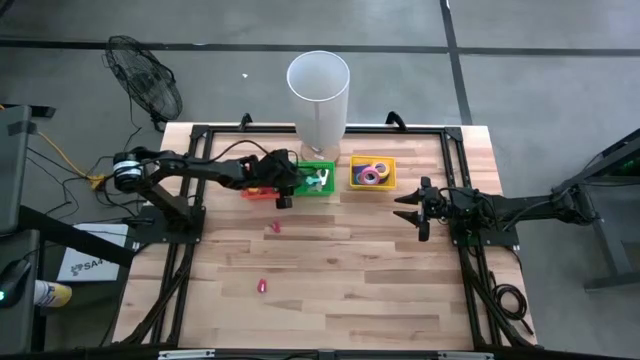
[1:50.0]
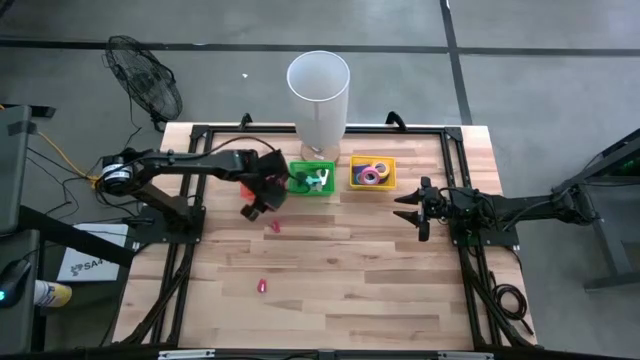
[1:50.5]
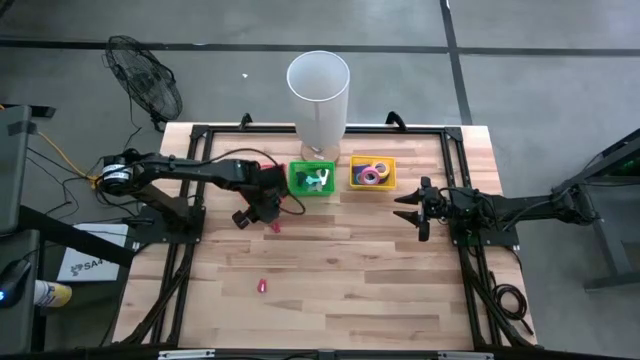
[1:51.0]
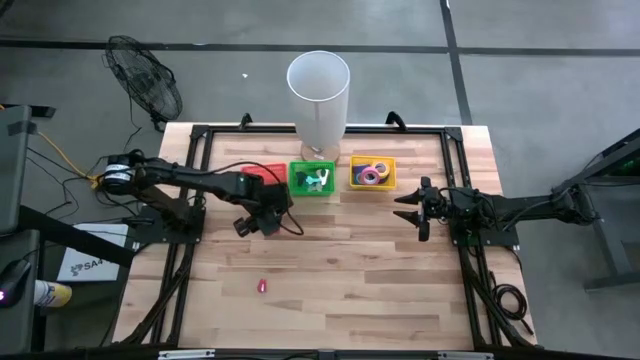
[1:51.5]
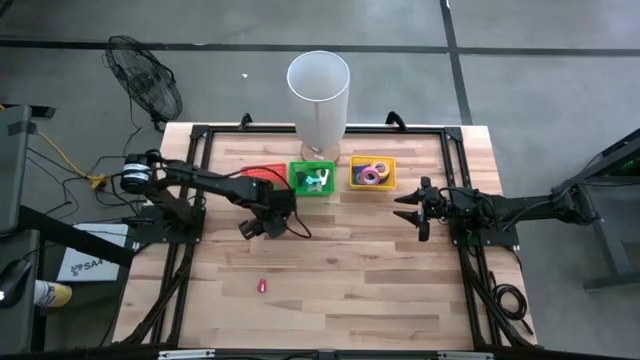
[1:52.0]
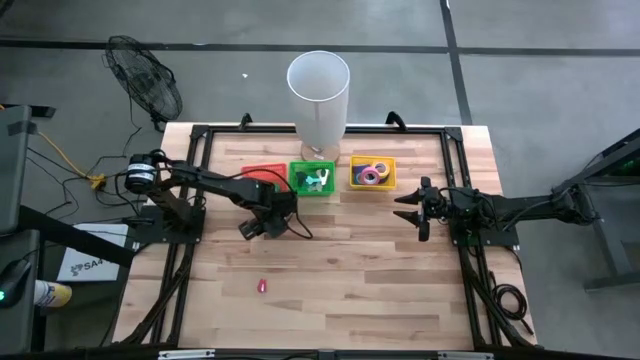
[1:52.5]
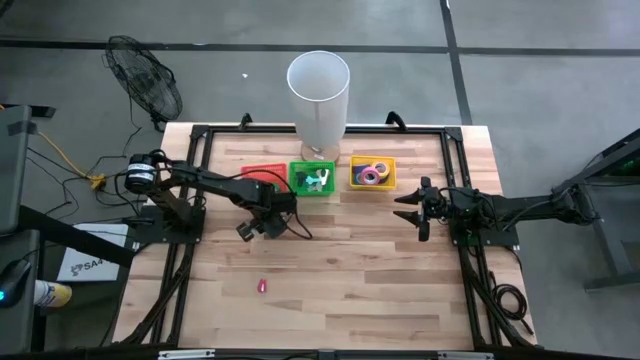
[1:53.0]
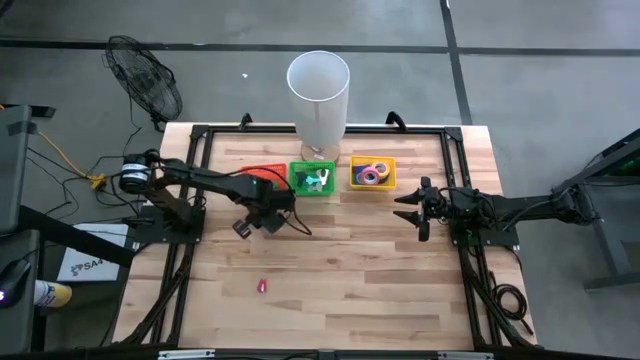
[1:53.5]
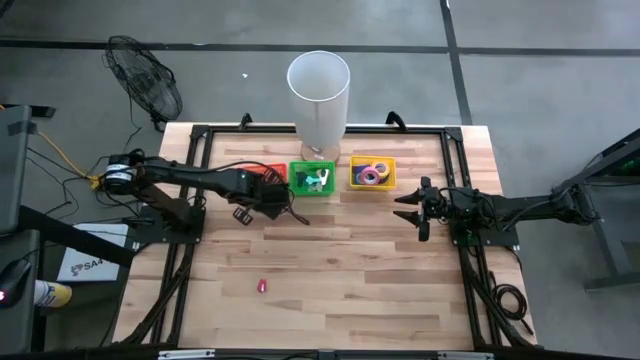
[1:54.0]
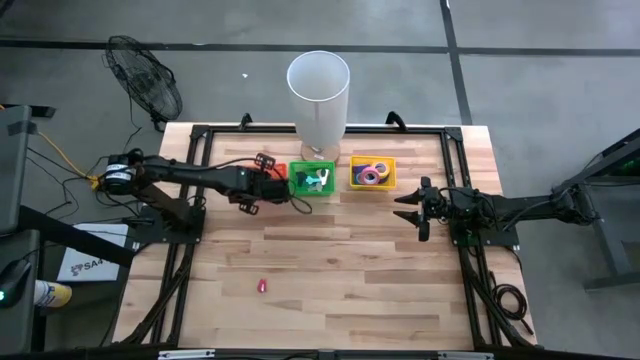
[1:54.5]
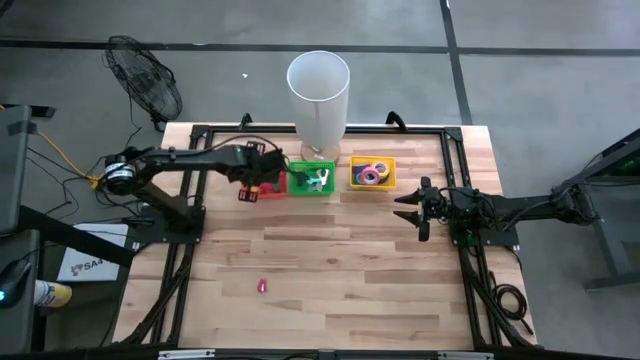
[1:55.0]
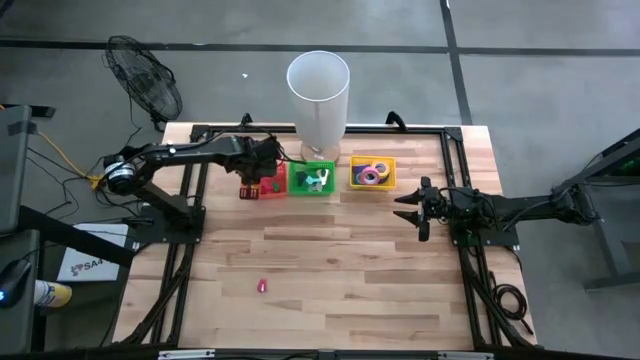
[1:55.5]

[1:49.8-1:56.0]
Task: Pick and place Stapler, Stapler remover, tape
Put the red stapler into the orange bin

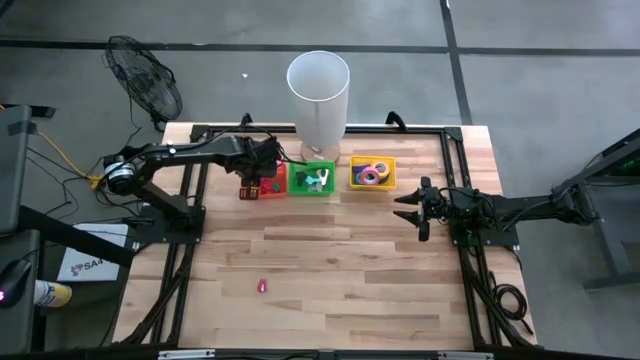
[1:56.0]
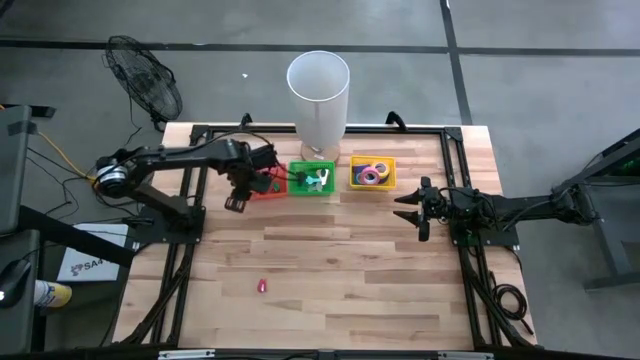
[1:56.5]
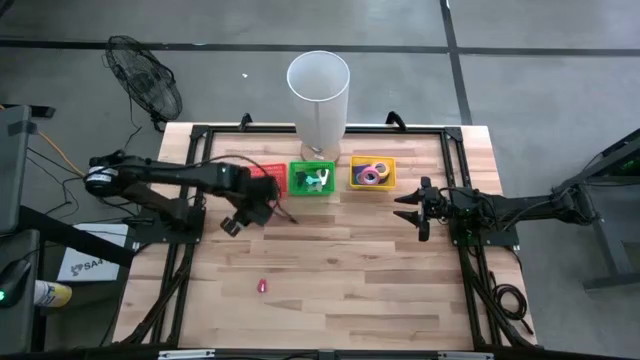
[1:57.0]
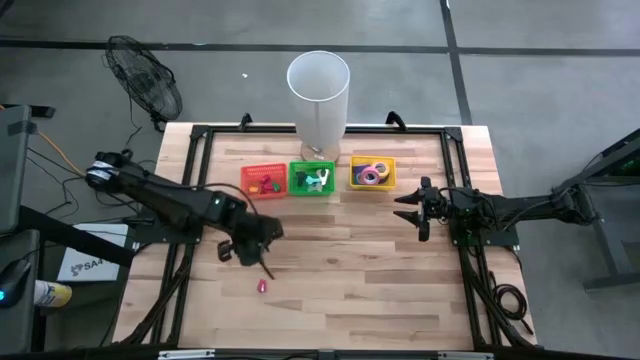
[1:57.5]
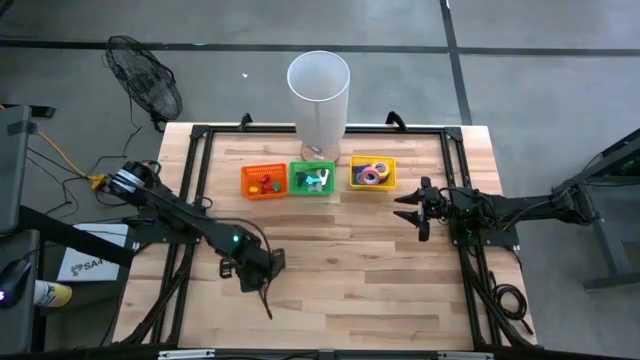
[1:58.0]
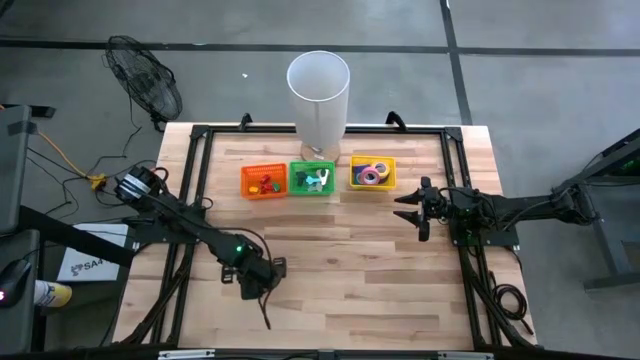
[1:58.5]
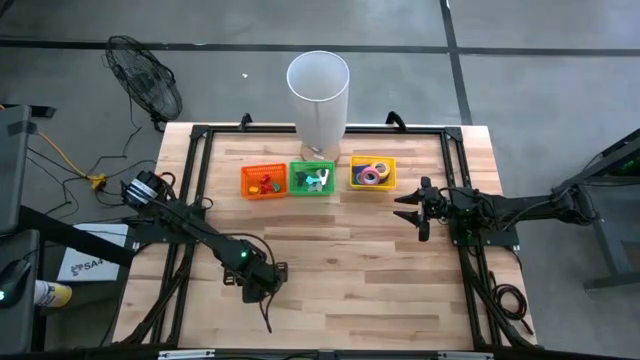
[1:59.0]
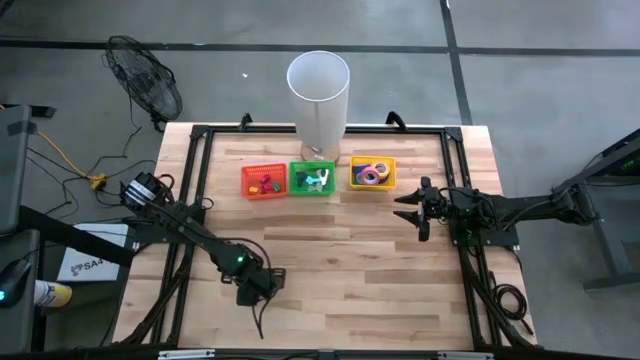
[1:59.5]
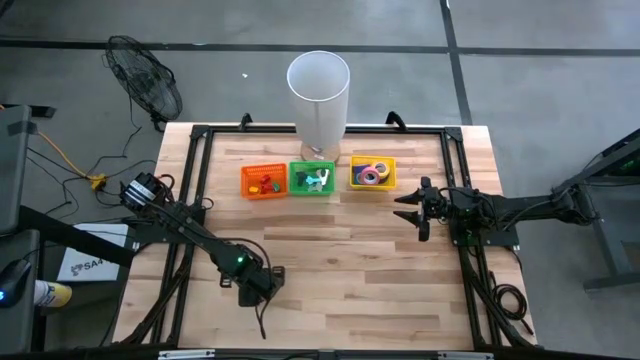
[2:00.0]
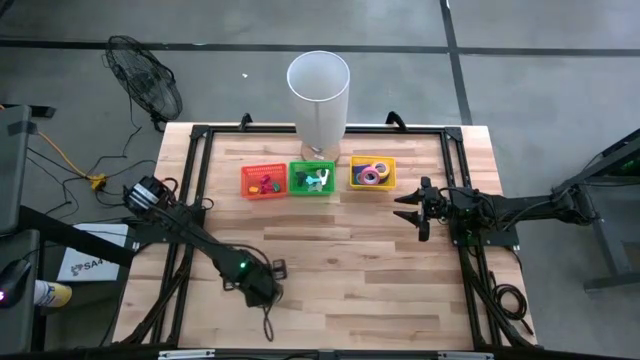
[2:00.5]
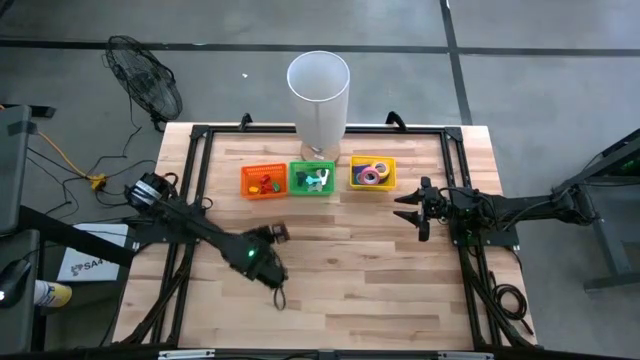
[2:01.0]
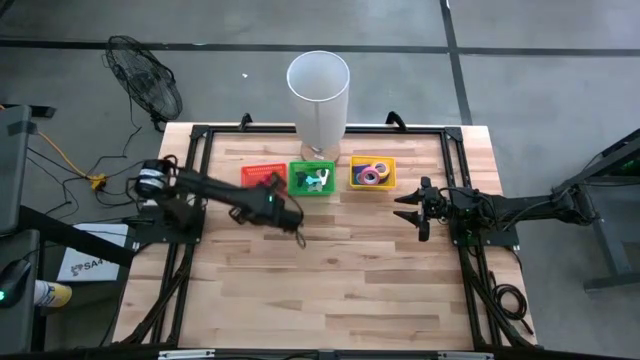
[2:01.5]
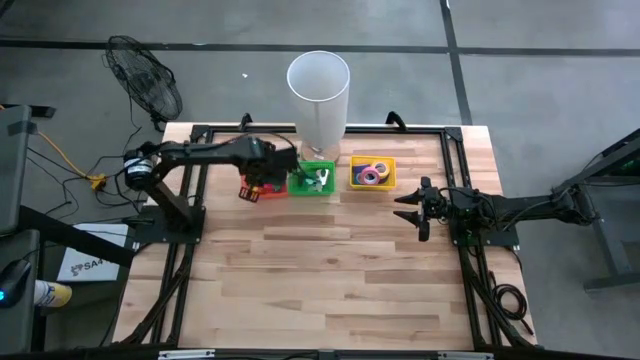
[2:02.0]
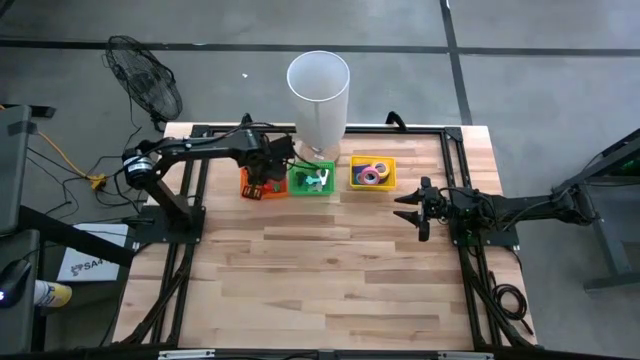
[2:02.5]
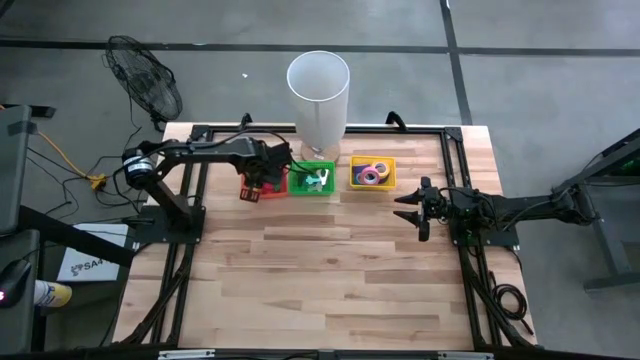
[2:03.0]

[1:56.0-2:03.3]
Put the red stapler into the orange bin

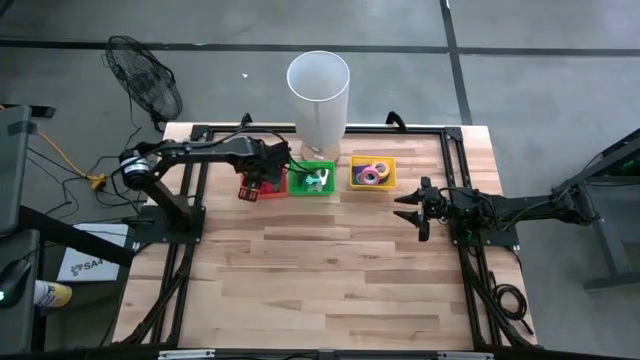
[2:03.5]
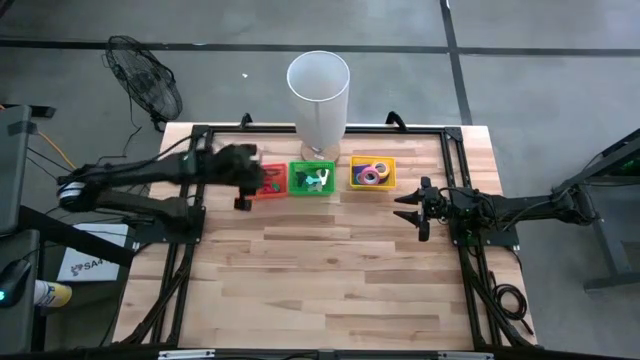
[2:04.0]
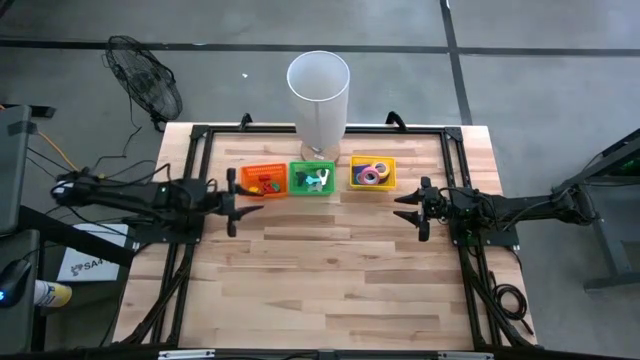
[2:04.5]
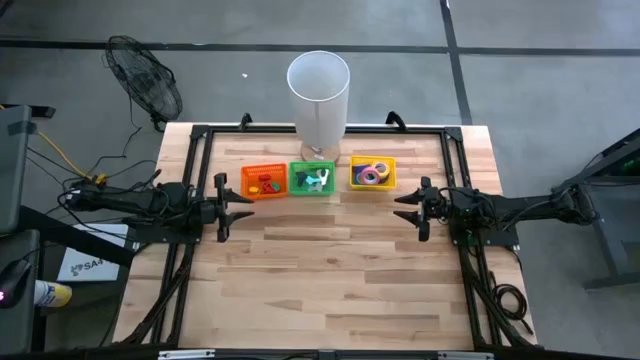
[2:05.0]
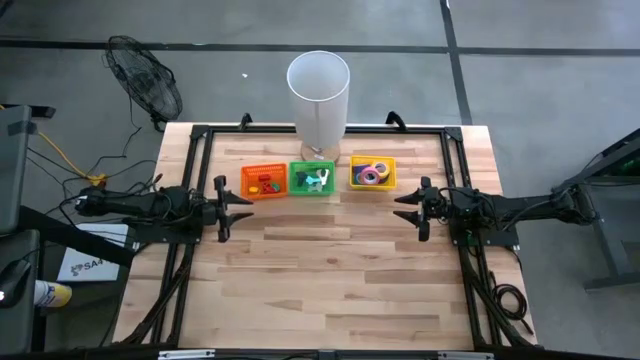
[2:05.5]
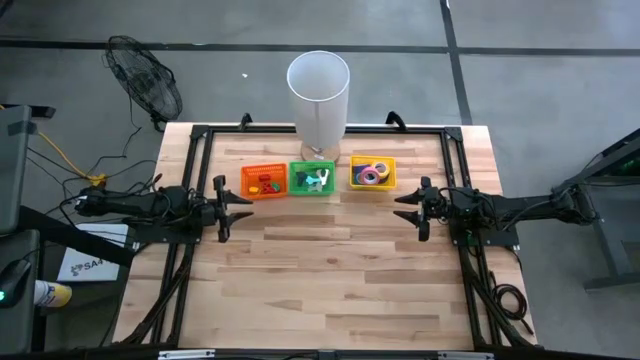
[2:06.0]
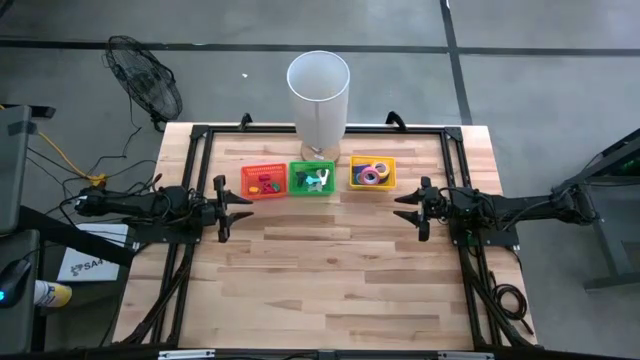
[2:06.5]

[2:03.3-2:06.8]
Return to Home Position

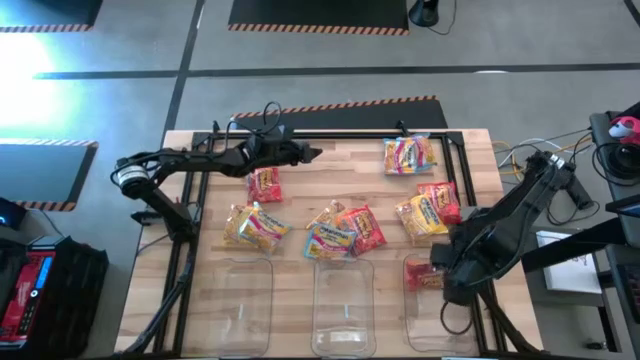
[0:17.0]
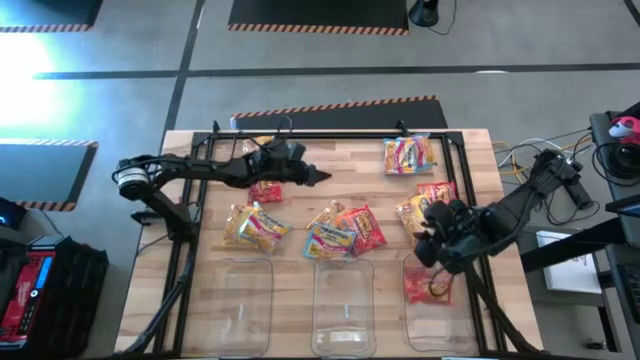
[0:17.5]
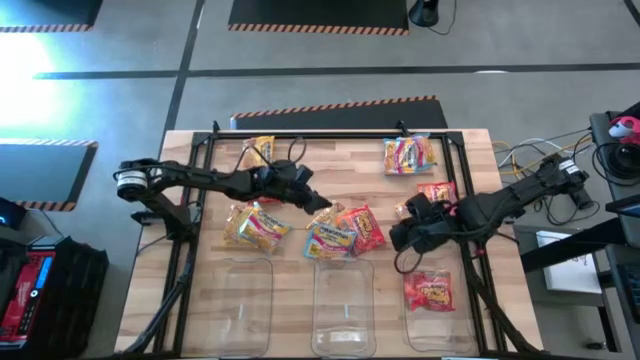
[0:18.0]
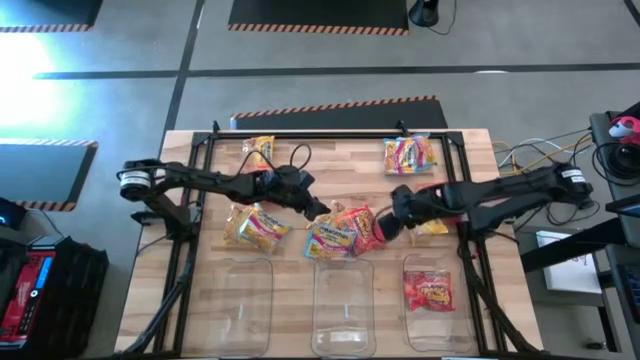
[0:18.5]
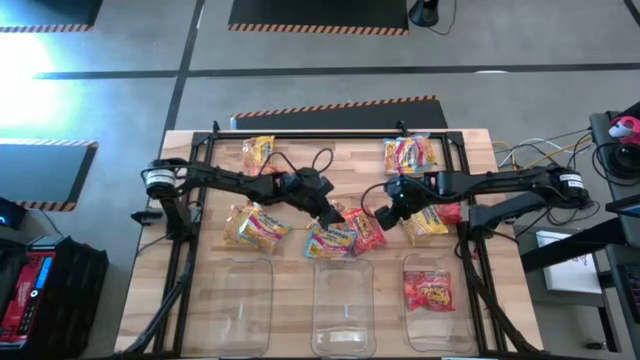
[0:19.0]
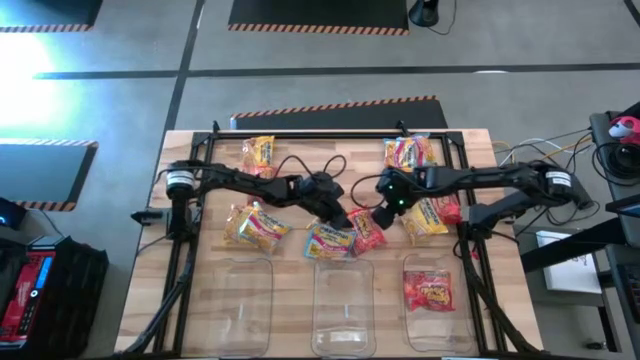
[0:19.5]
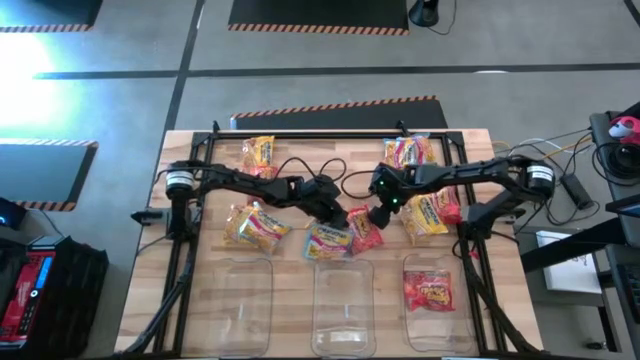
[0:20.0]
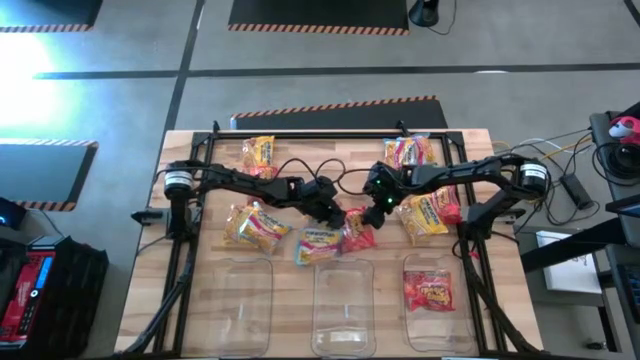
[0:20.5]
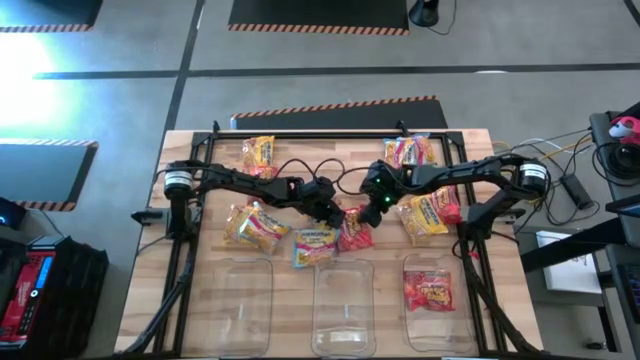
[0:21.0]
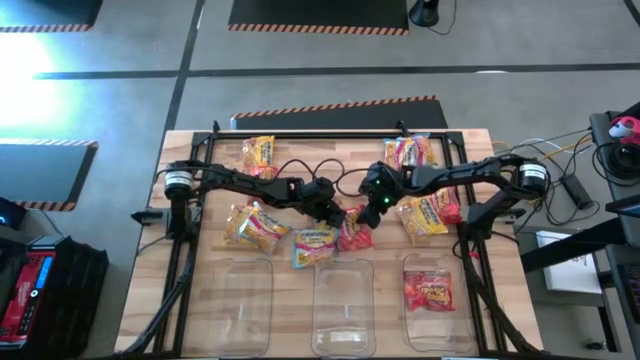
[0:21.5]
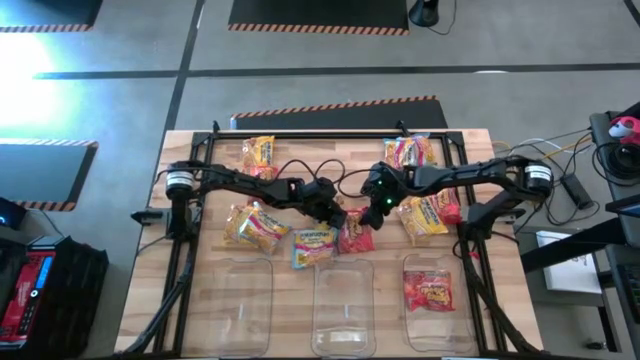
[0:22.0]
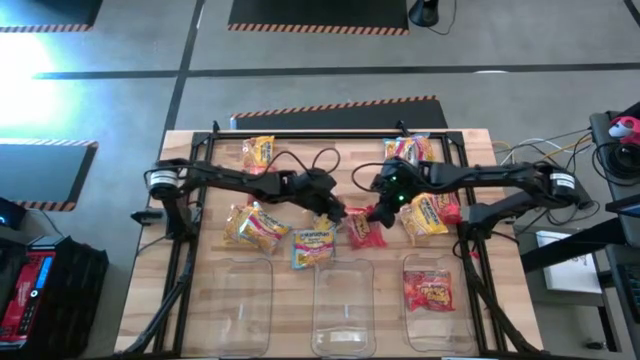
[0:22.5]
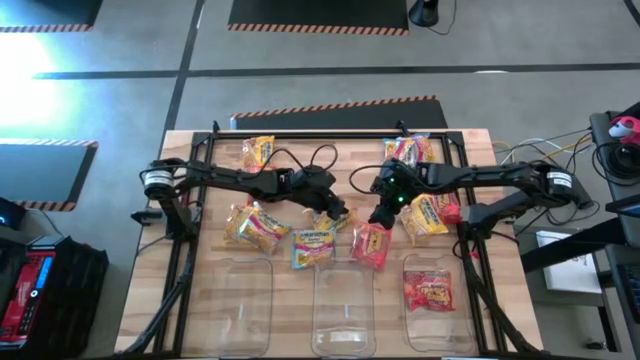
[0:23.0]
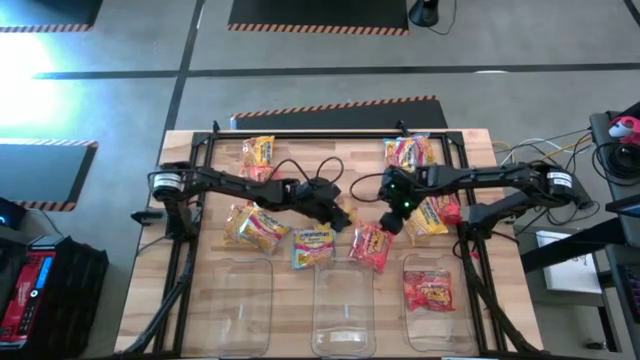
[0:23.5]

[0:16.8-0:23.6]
Task: Sort Maruchan noodles
Put the orange noodle pack into the right transparent bin
